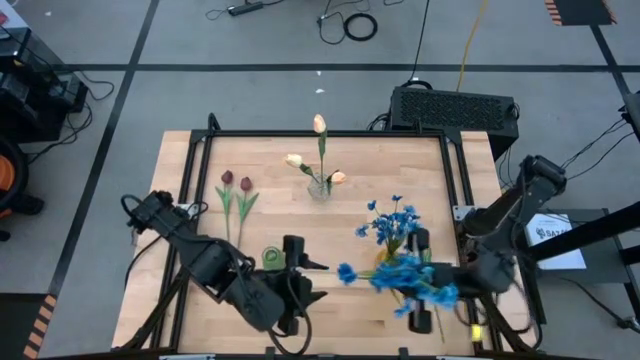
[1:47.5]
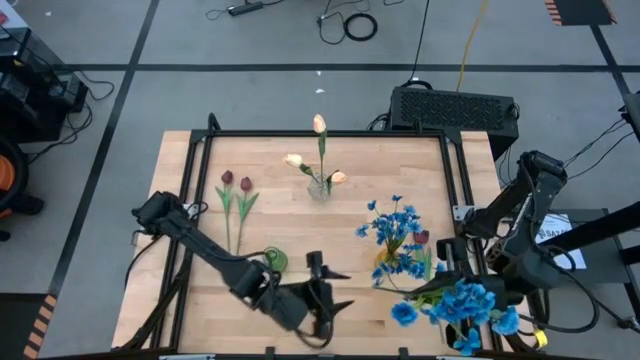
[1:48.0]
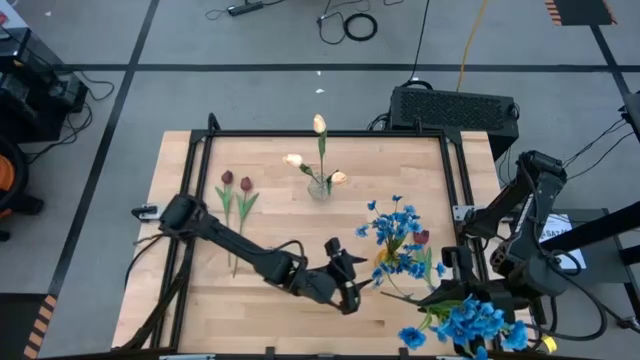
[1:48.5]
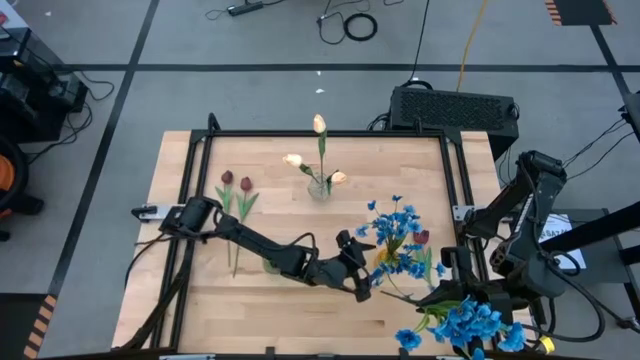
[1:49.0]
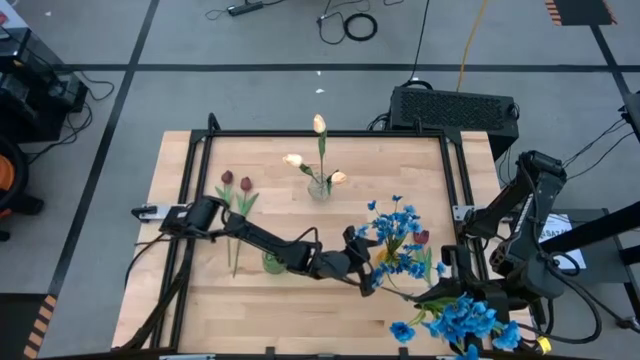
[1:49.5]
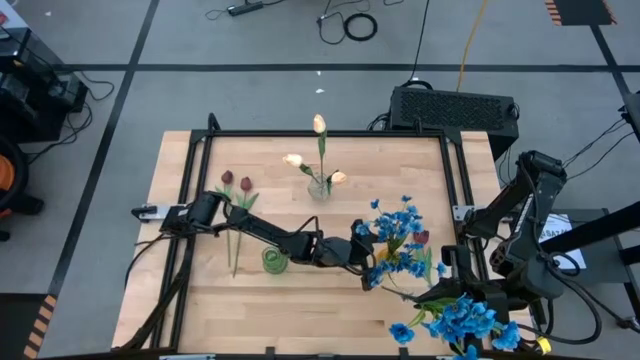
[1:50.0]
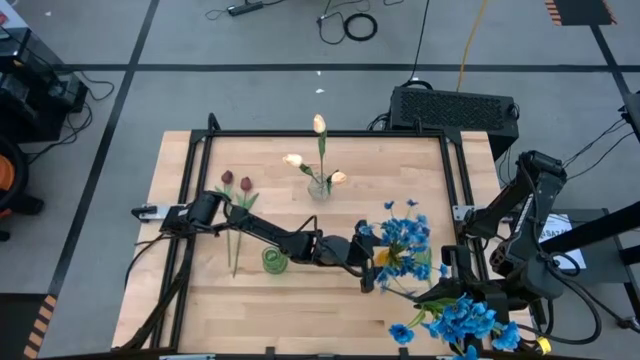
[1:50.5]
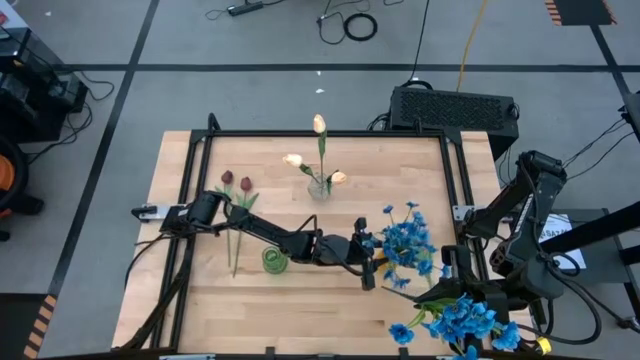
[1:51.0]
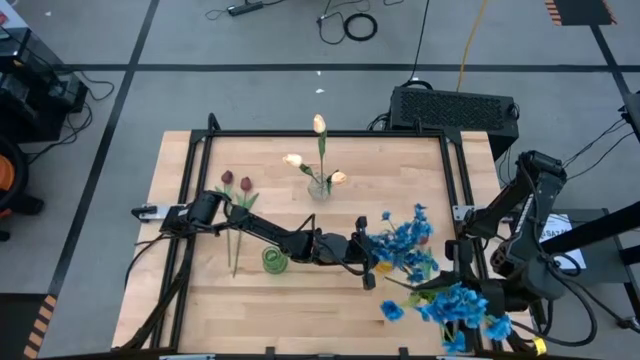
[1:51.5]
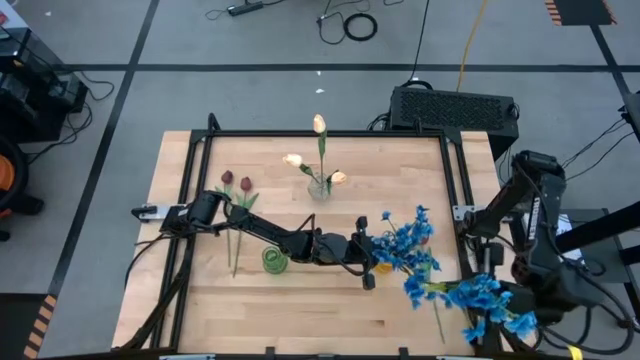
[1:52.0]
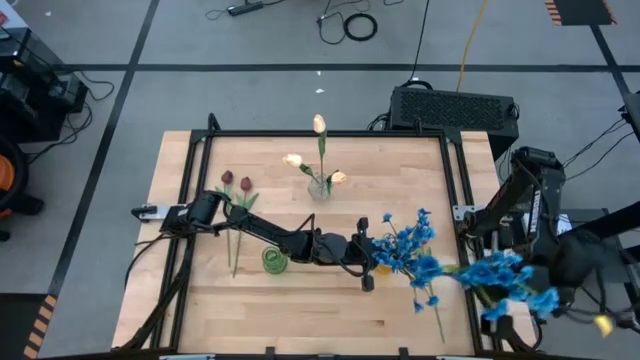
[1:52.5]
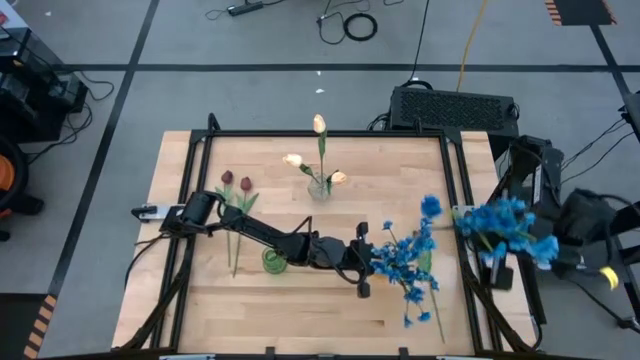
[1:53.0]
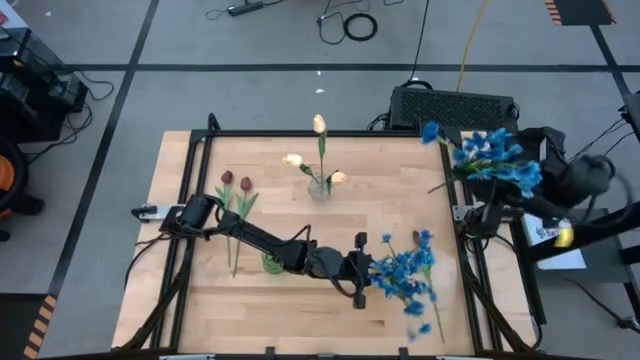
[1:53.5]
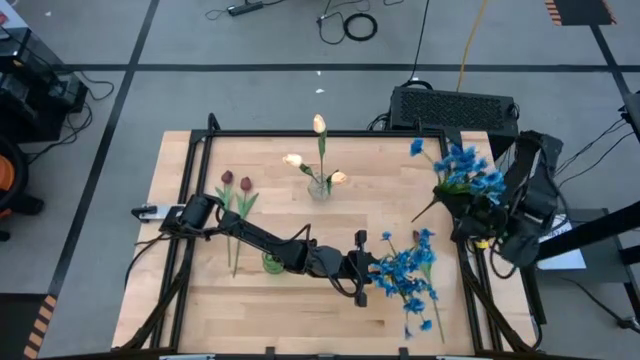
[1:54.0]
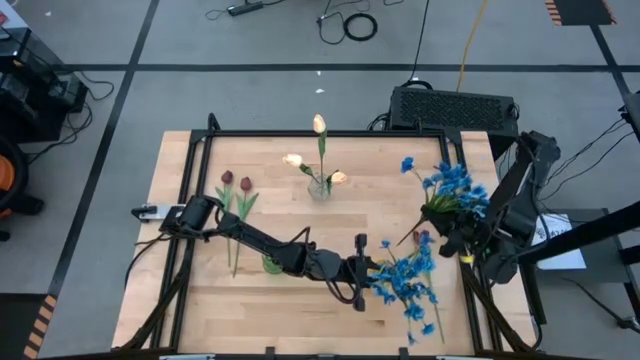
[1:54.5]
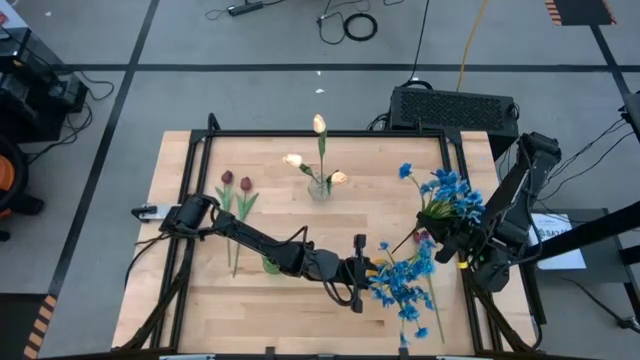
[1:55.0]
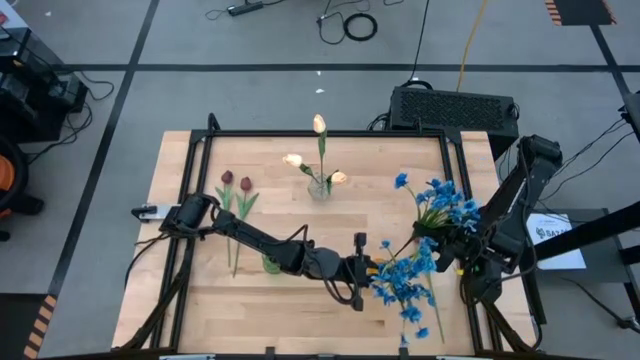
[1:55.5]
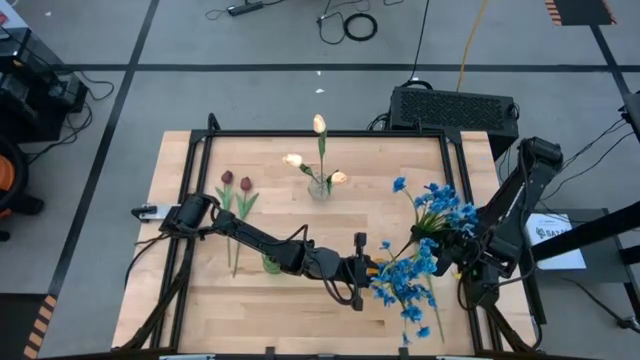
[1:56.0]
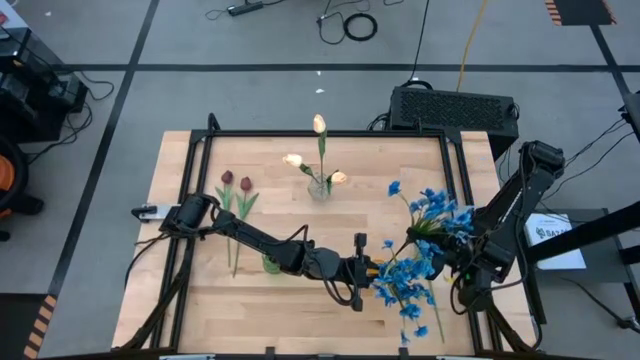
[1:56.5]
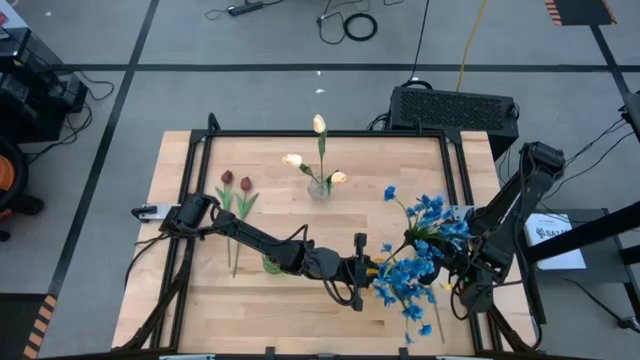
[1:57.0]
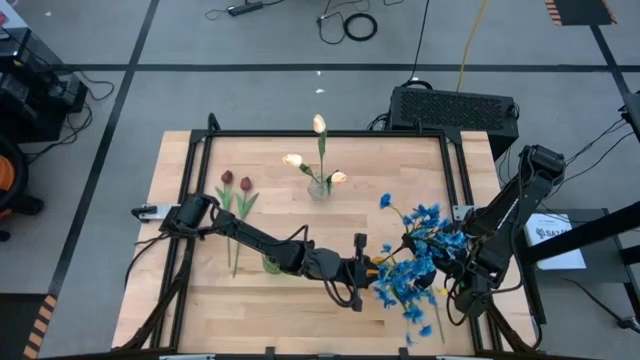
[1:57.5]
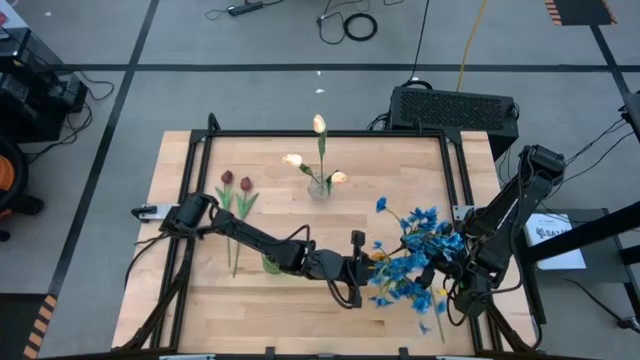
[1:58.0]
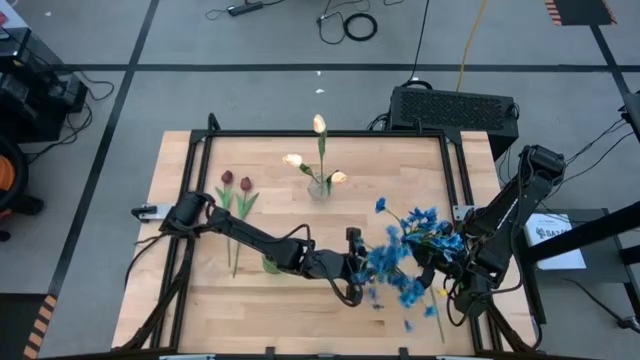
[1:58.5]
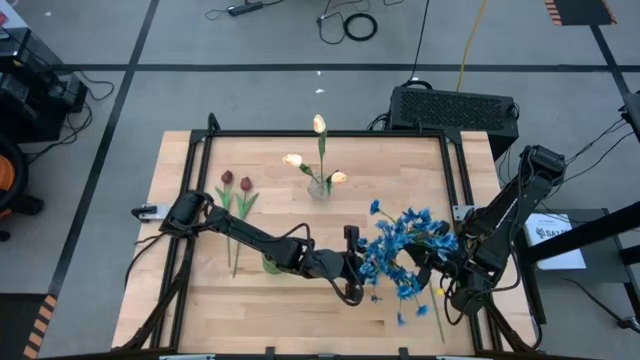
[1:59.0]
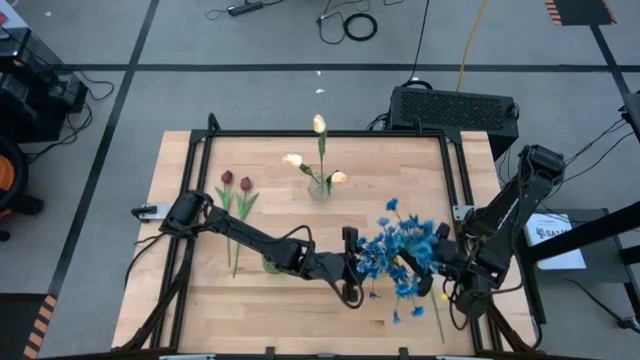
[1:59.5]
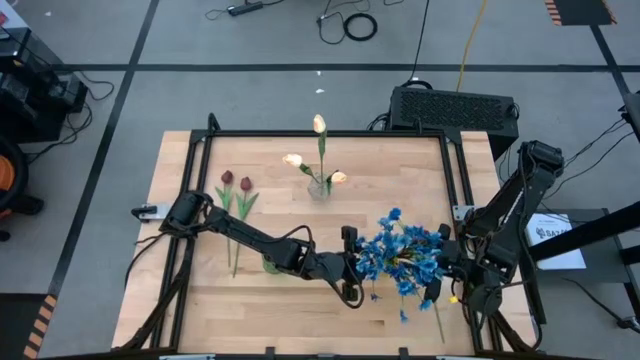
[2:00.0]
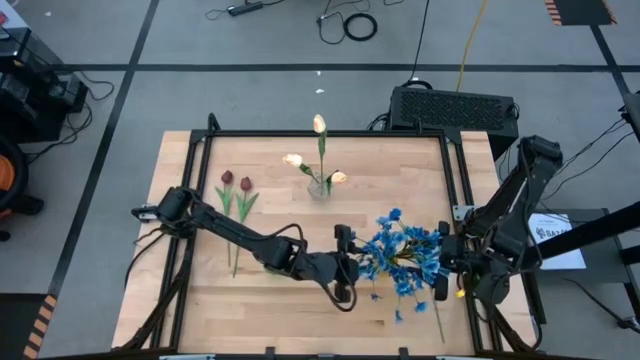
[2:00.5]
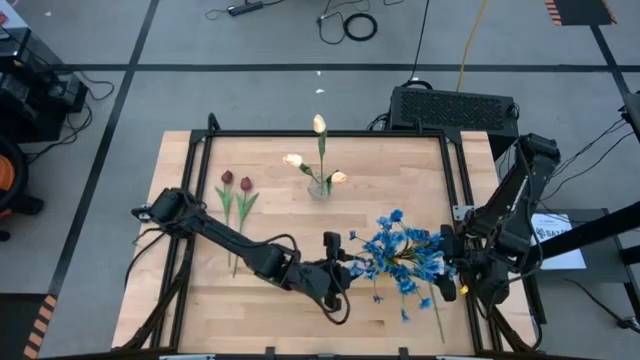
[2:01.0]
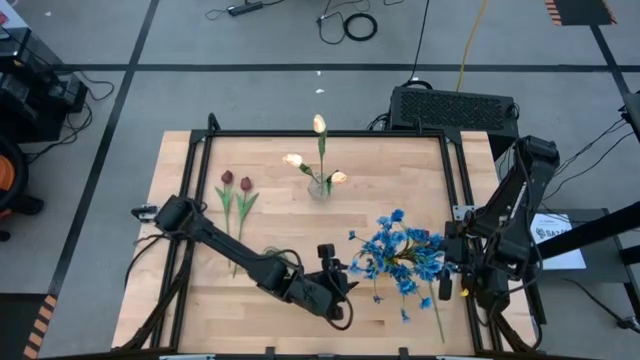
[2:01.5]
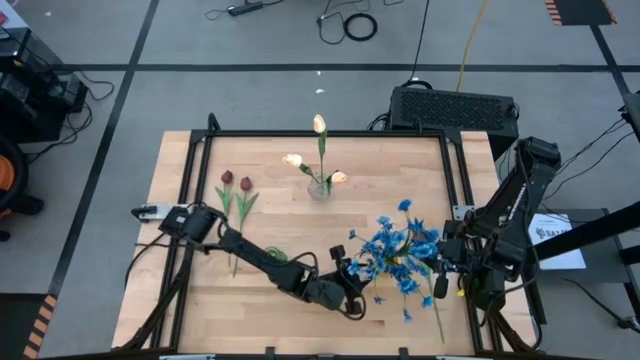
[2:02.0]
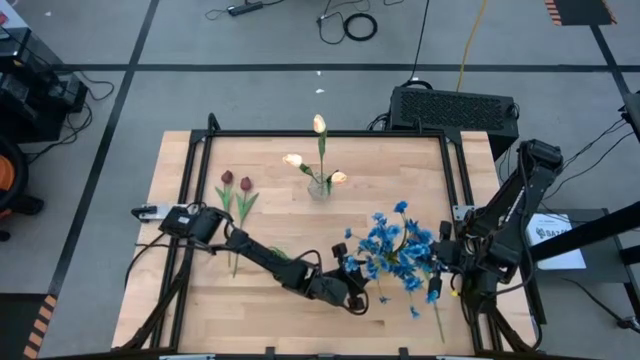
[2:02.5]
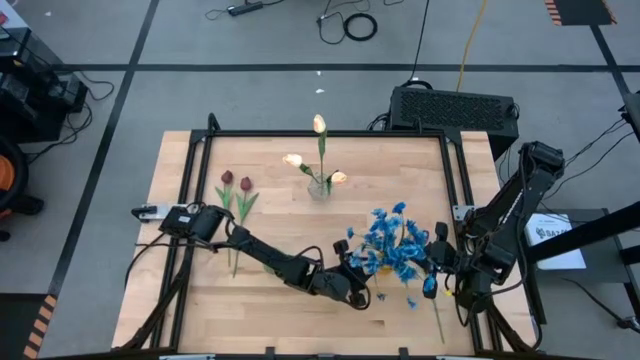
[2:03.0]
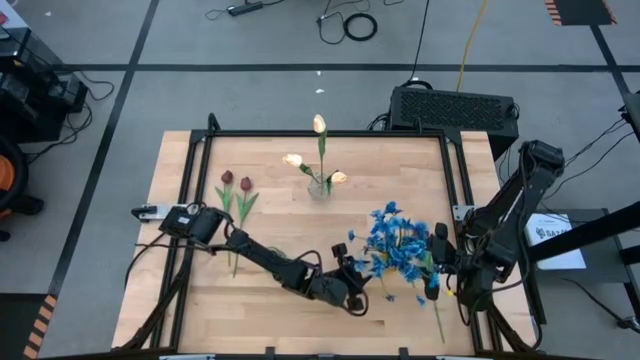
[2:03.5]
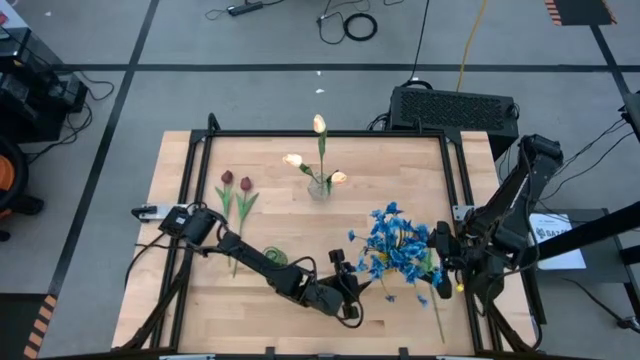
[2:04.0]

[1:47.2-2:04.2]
Task: Sort flowers into vase by color
Put the blue flowers into the yellow vase

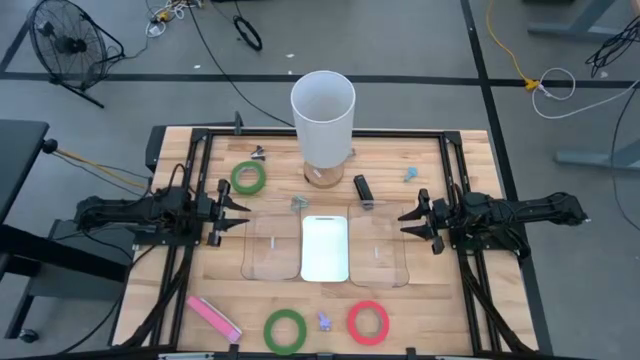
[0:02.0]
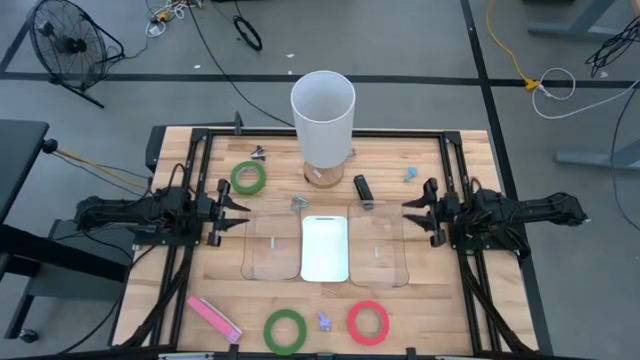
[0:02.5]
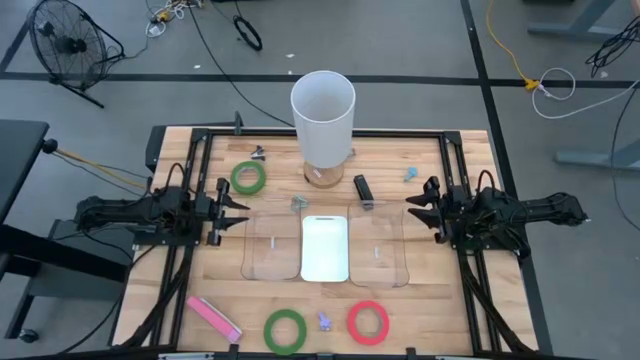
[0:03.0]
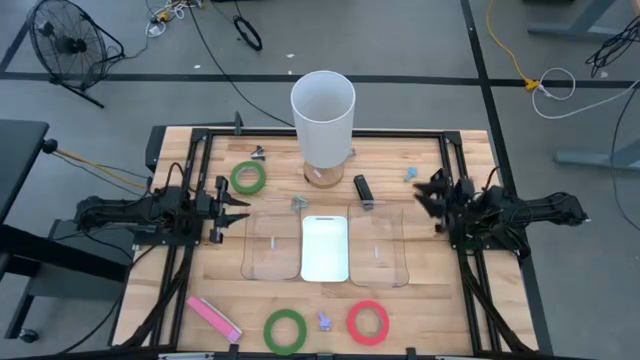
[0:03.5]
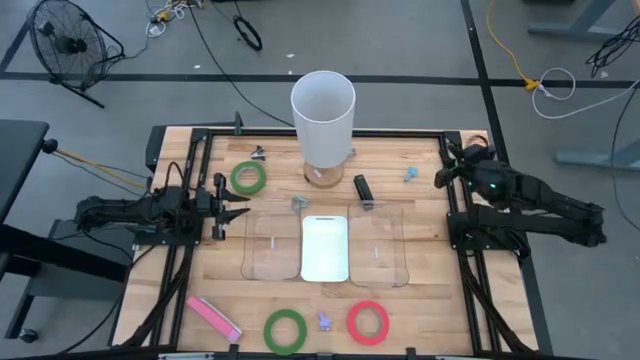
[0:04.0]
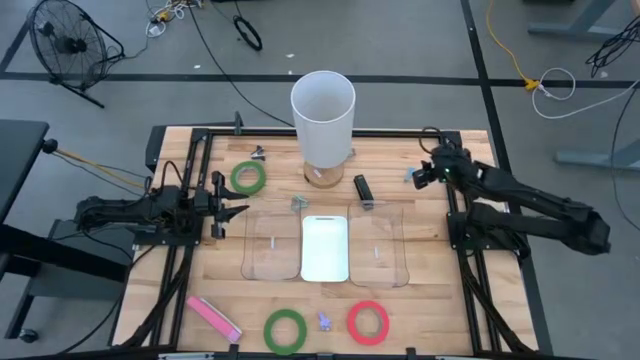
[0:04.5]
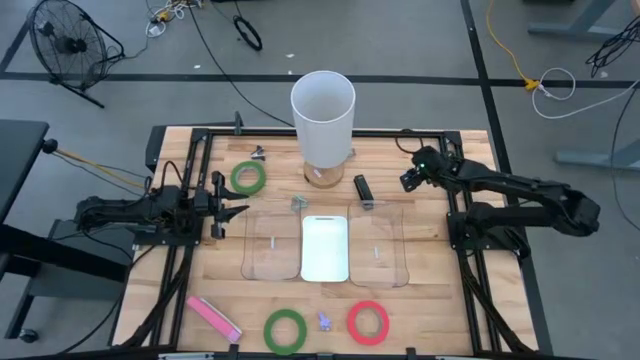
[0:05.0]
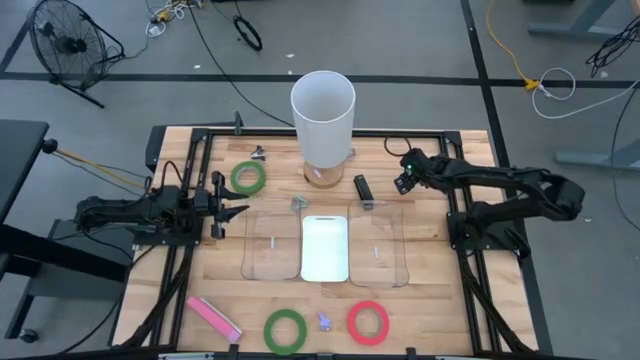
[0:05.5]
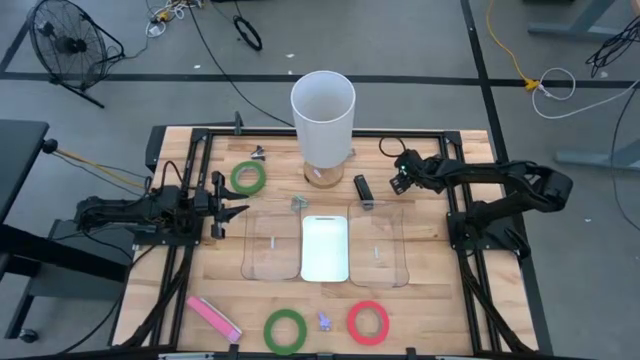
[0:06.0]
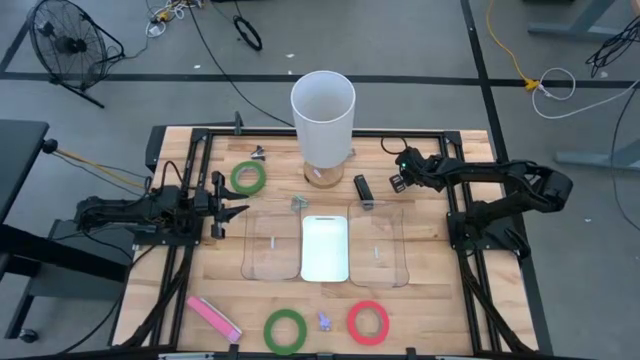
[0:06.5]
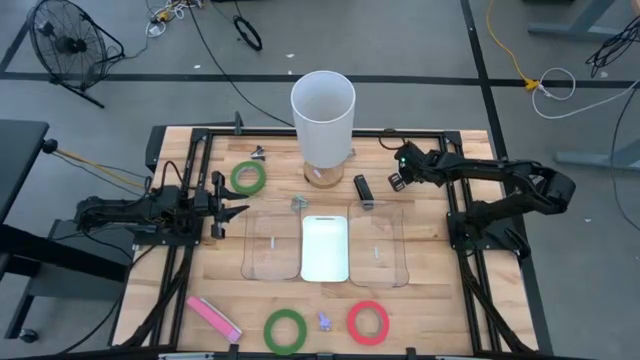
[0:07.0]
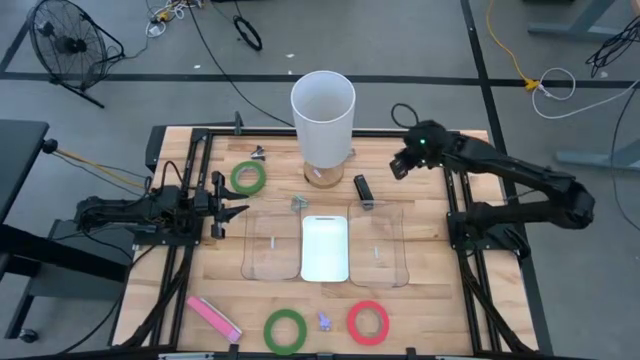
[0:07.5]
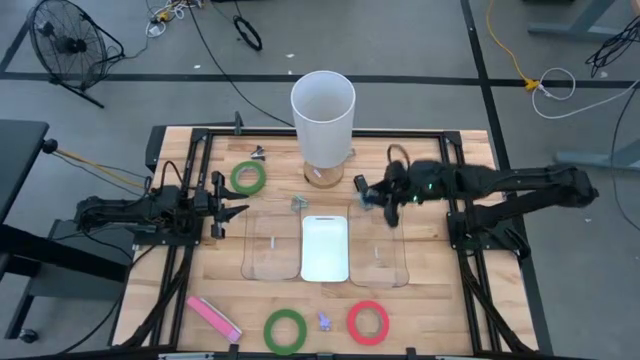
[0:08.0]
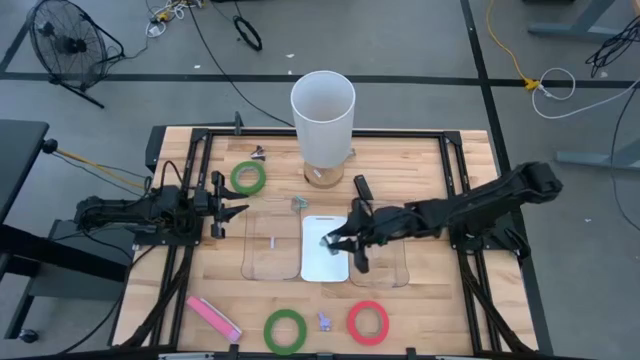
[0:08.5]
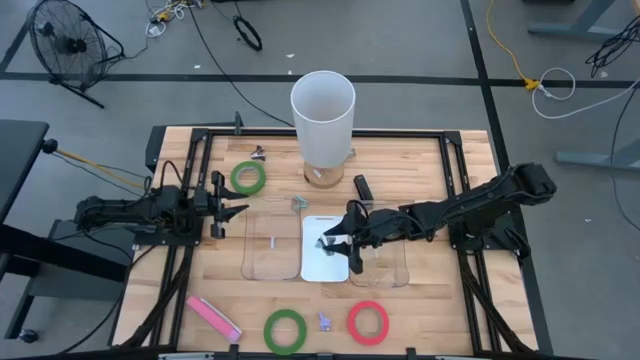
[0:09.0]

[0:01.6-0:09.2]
Task: Pick and place Stapler, Stapler remover, tape
Put the gray staple remover into the white bin
